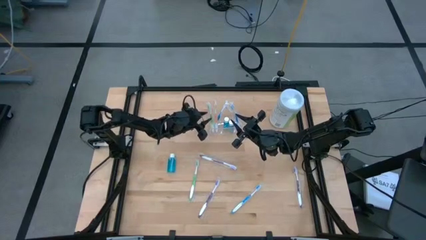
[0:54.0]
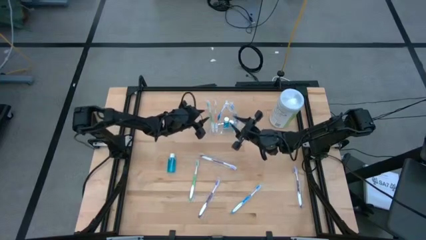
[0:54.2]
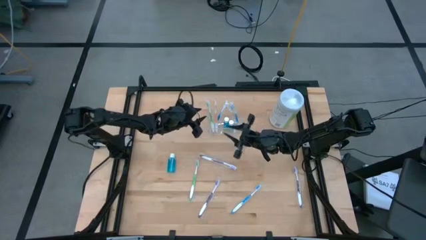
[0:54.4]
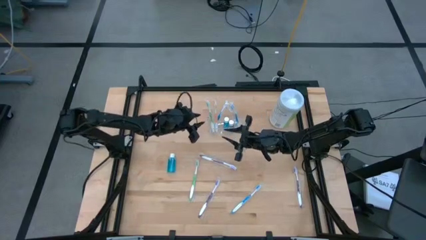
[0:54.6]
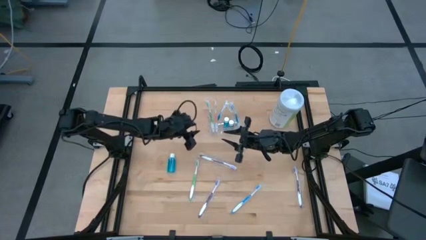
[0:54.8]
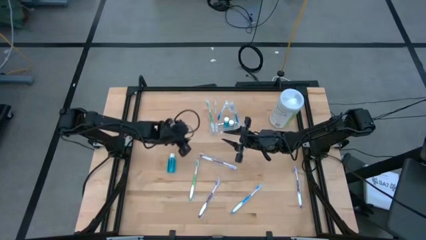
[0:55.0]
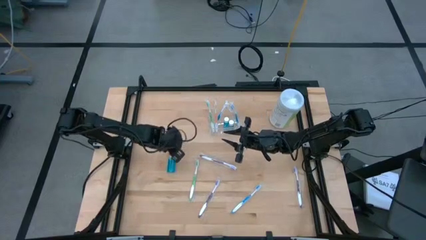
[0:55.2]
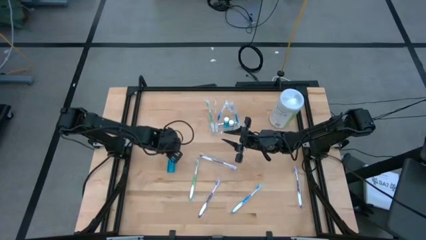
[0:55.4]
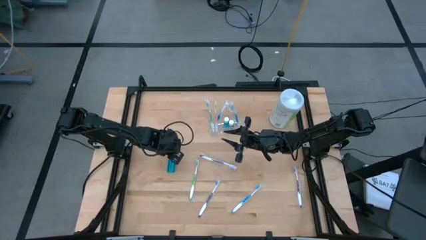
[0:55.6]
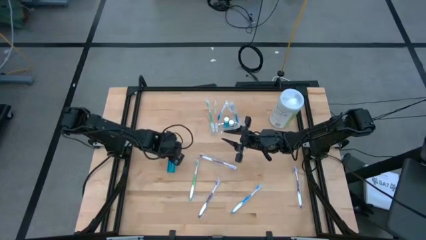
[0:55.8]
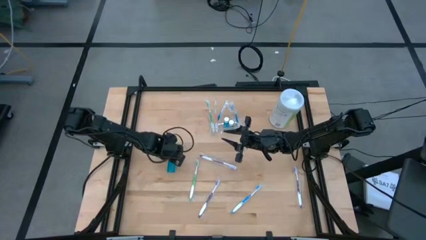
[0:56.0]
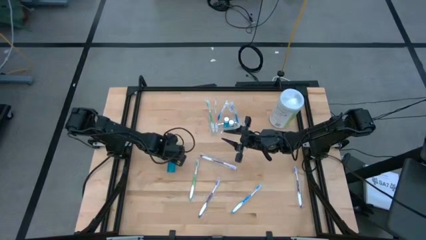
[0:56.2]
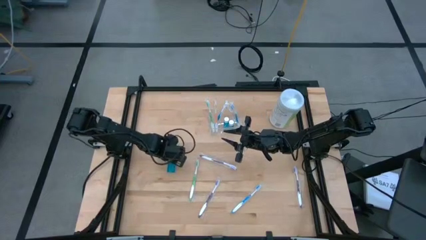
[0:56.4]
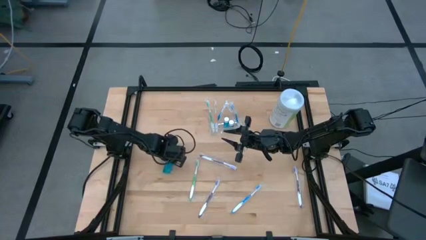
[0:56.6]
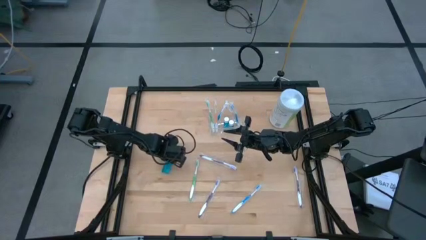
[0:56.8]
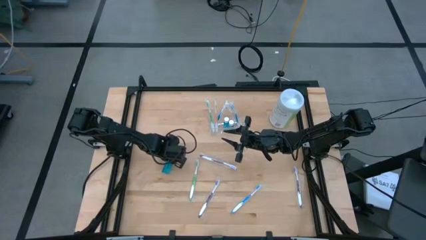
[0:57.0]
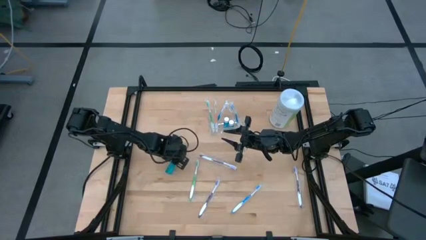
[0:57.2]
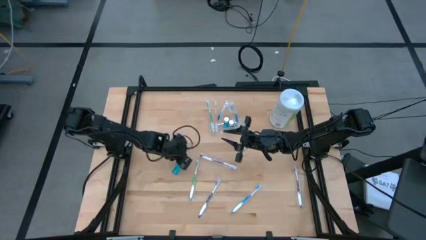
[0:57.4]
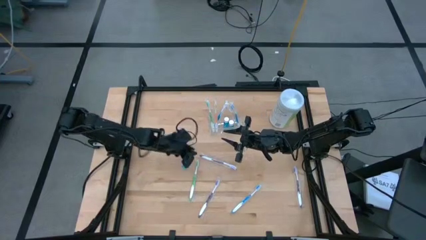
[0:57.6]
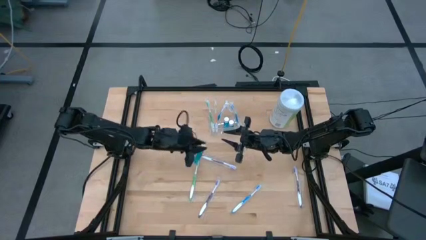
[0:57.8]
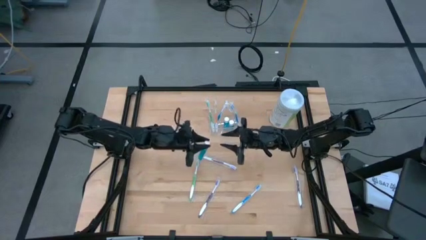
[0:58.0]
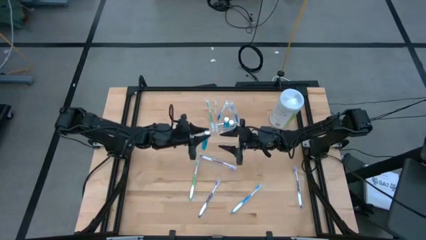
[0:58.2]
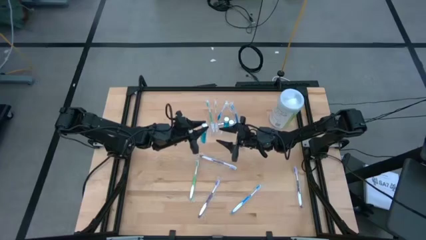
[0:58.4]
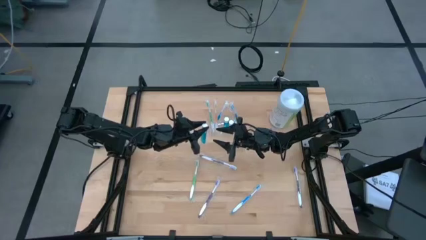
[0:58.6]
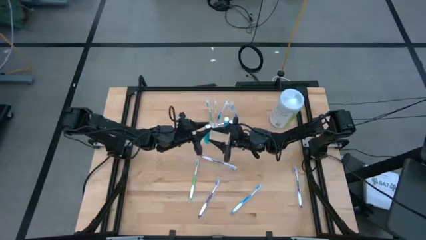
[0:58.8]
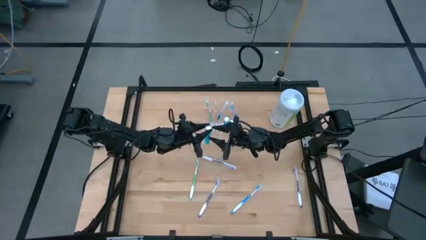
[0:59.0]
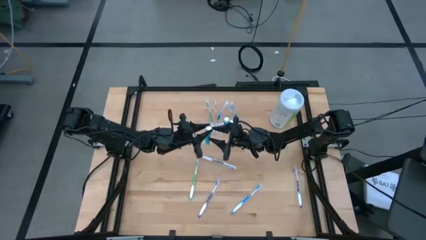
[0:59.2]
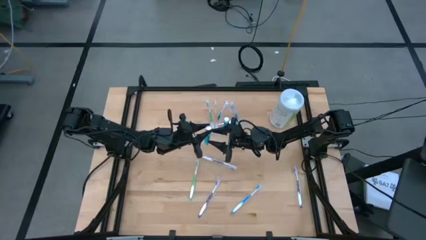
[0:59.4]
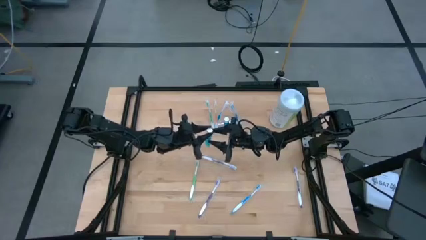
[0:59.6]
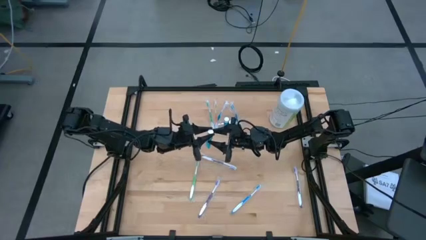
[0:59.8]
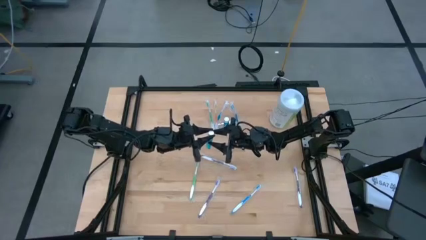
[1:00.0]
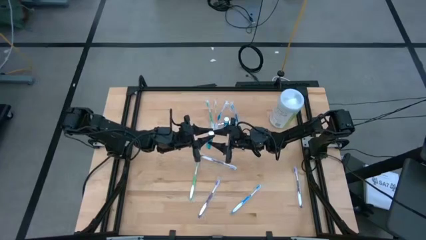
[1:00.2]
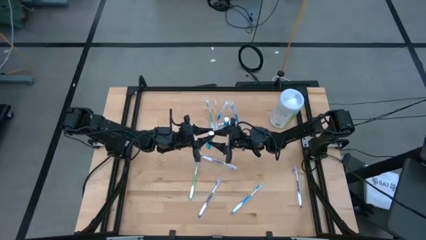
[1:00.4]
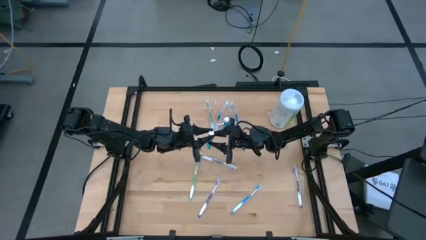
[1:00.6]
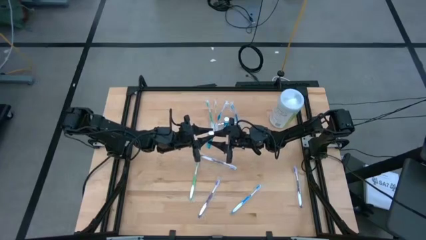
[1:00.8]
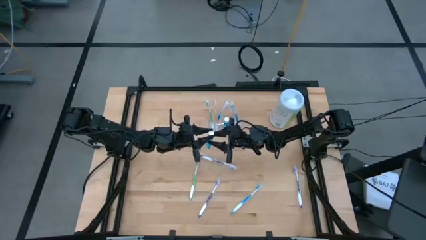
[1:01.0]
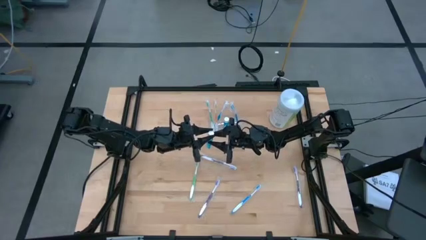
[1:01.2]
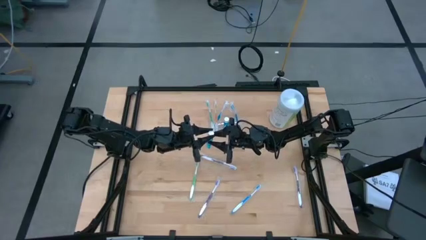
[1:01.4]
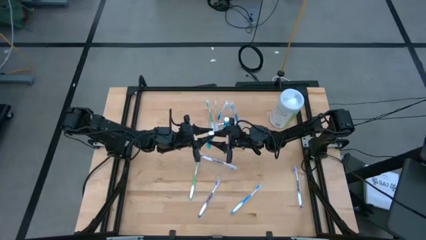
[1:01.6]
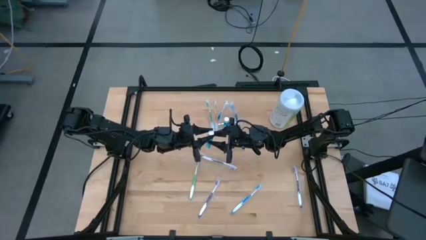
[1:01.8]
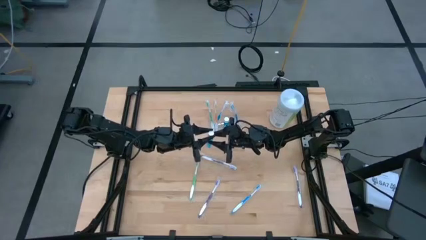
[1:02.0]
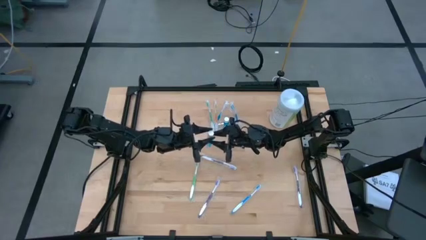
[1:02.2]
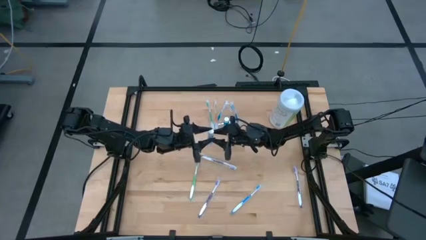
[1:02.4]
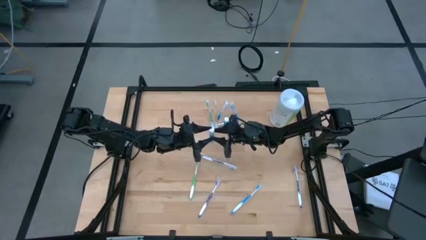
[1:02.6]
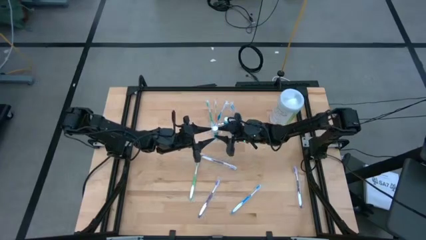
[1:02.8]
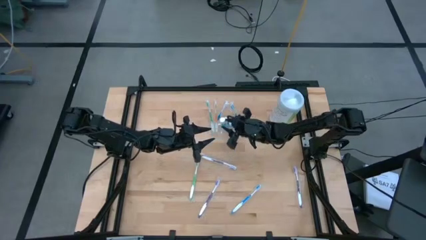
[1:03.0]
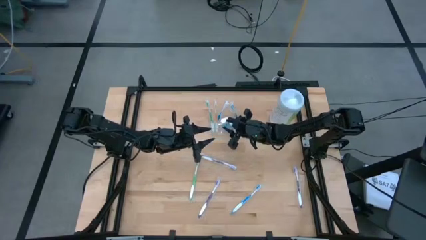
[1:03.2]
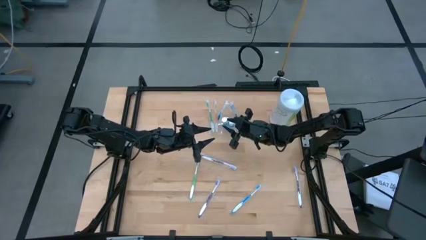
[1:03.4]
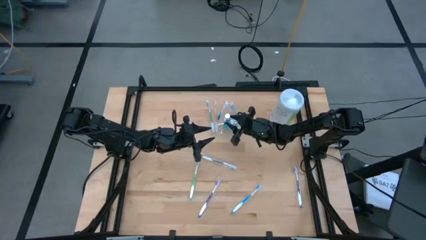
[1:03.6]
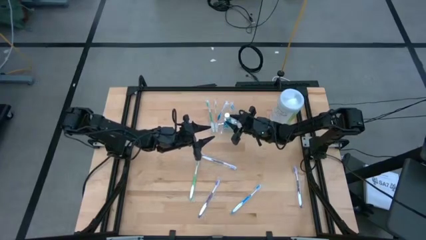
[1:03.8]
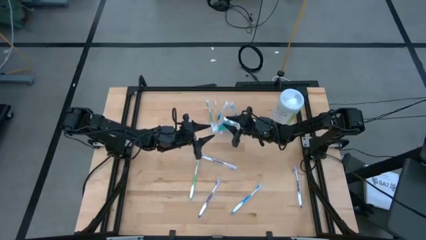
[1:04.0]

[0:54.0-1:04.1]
Task: Pick & Place toothbrushing station
Put the blue mouthwash into the transparent organizer

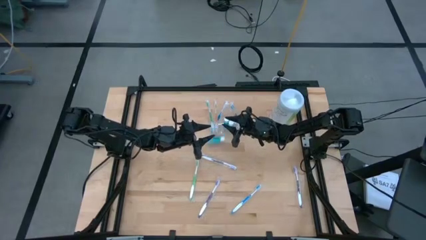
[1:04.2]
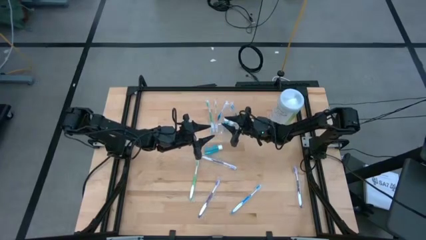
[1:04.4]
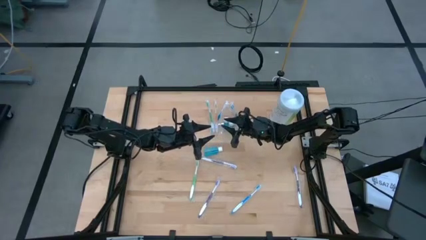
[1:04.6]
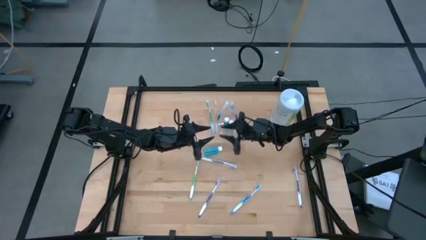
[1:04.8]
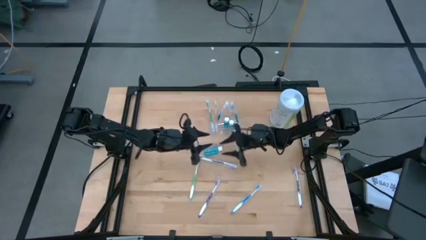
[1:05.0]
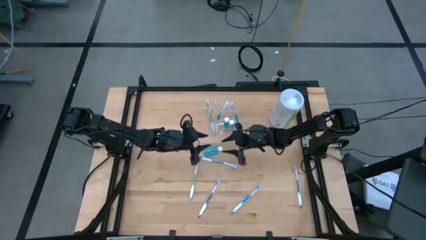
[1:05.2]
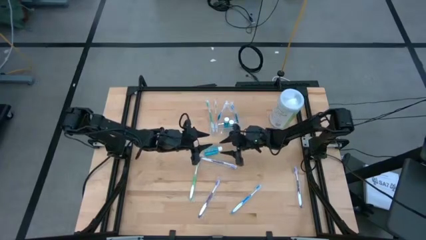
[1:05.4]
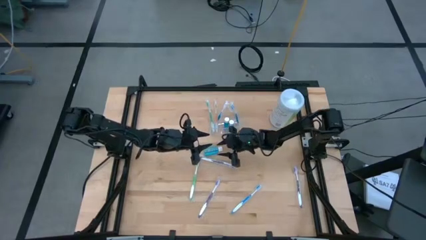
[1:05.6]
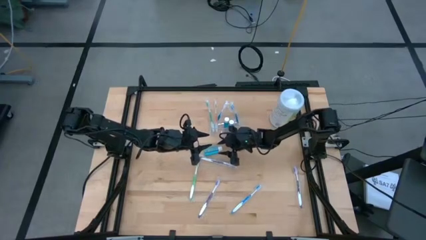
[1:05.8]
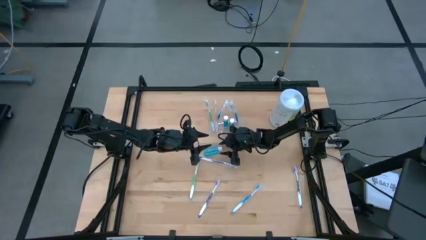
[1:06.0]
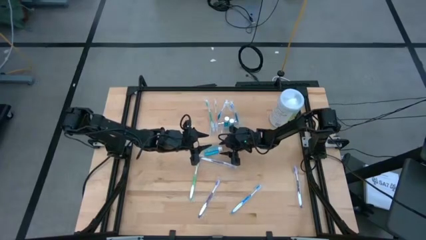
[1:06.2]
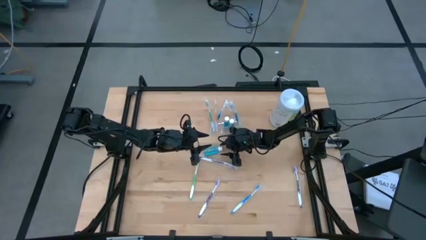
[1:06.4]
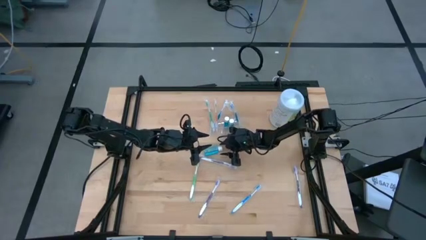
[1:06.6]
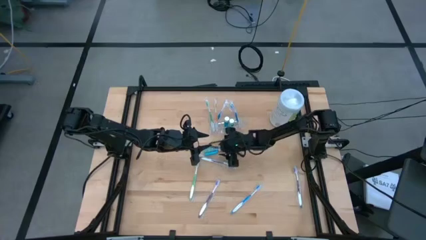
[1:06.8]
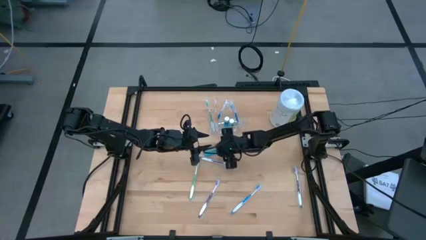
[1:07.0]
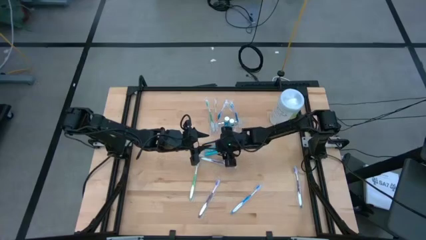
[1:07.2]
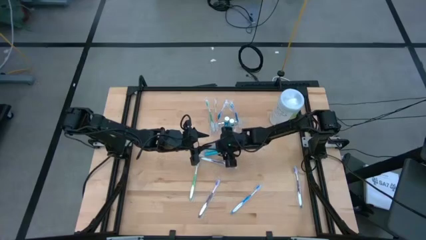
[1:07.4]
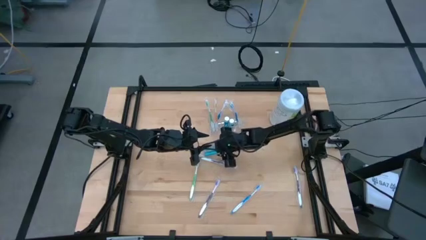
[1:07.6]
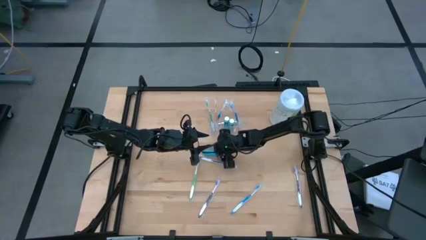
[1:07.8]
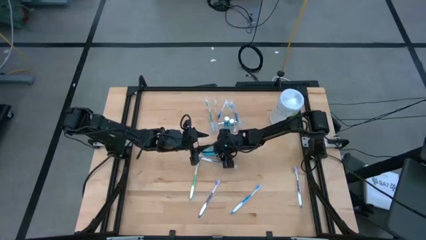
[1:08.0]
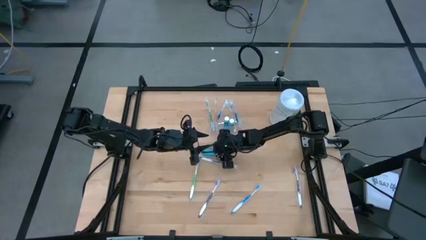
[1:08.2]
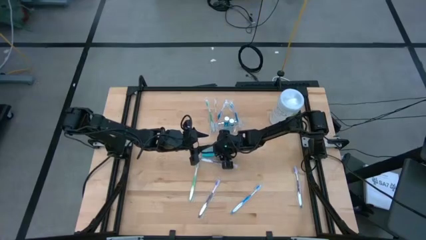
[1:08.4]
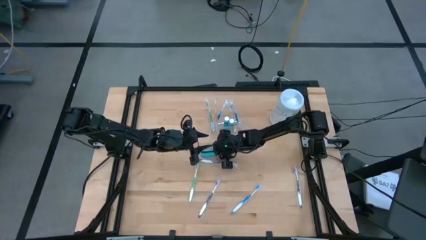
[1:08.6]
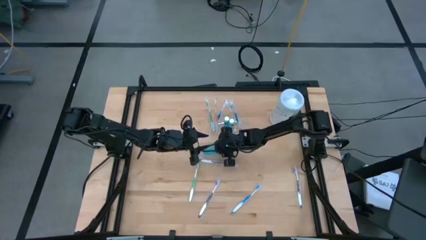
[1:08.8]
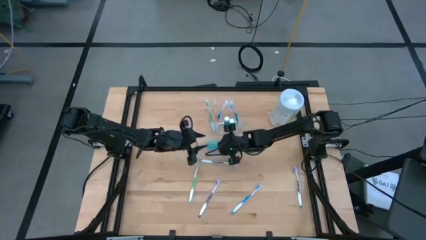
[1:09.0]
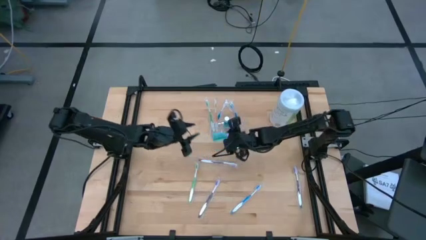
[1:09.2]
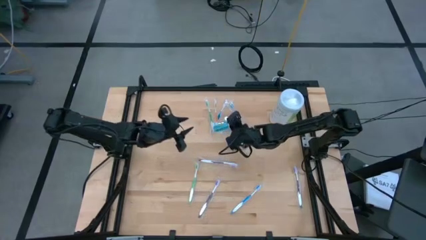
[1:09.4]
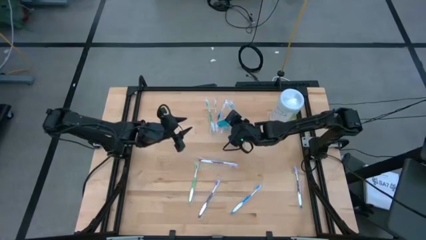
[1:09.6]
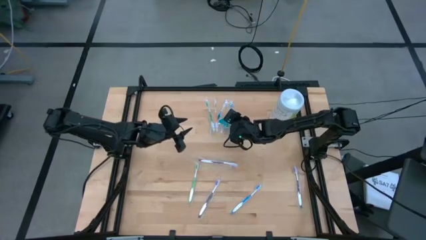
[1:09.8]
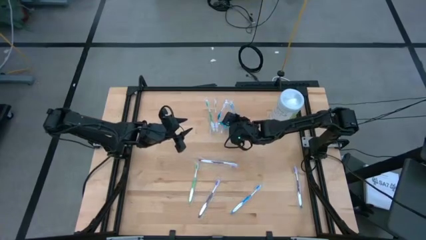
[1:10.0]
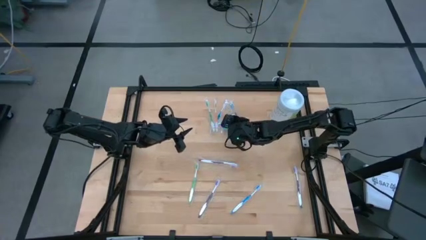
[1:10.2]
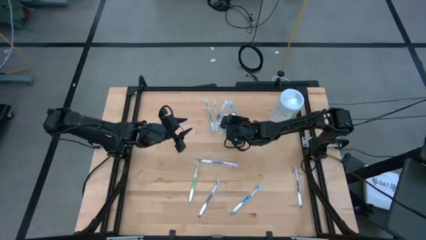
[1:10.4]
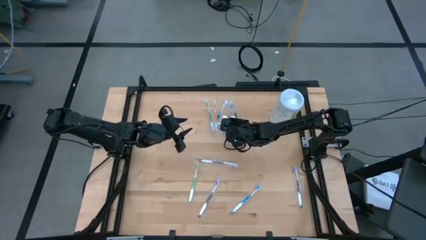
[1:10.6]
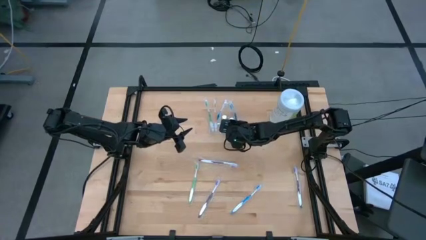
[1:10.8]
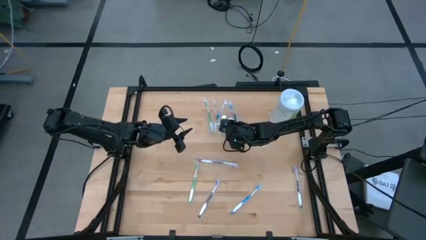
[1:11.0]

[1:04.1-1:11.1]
Put the blue mouthwash into the transparent organizer
